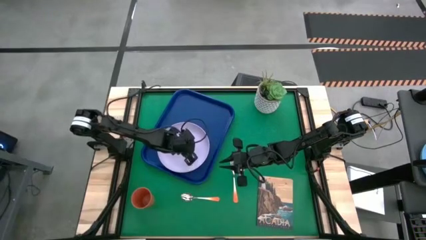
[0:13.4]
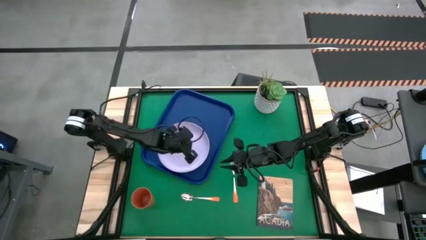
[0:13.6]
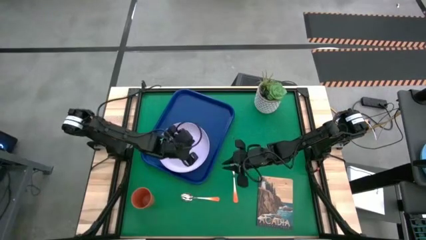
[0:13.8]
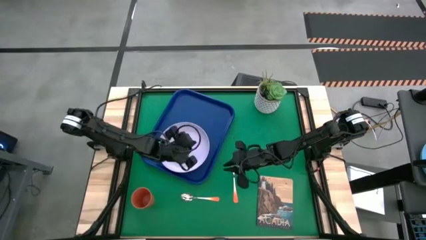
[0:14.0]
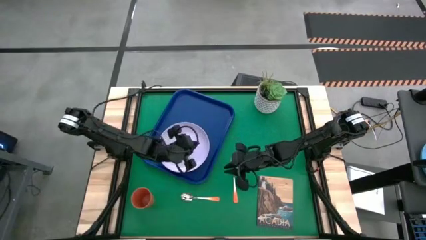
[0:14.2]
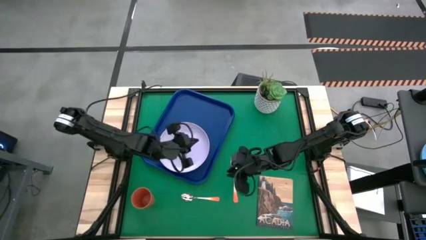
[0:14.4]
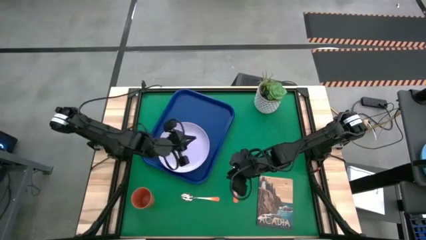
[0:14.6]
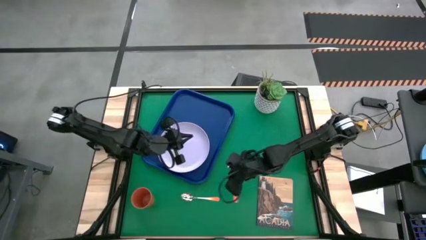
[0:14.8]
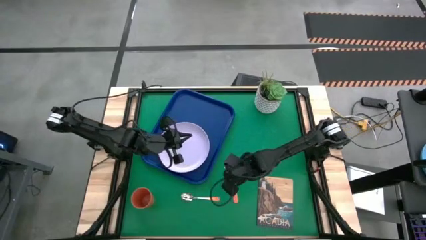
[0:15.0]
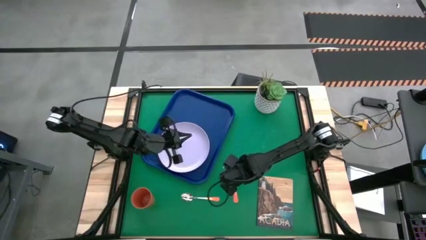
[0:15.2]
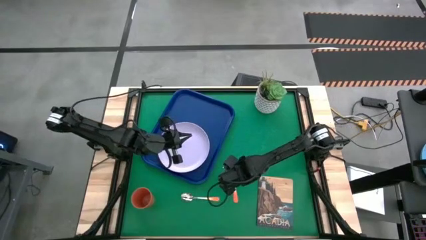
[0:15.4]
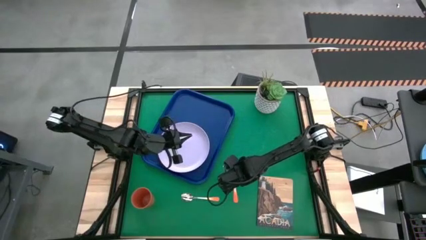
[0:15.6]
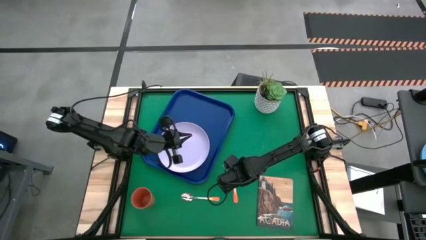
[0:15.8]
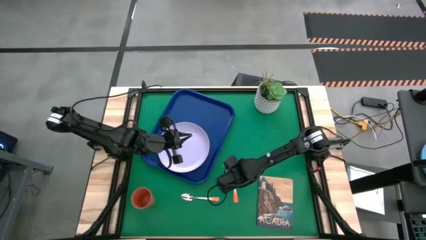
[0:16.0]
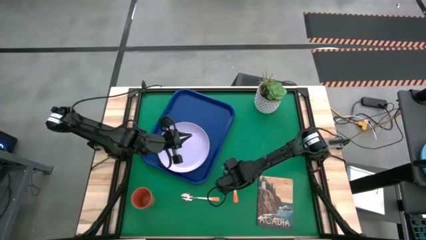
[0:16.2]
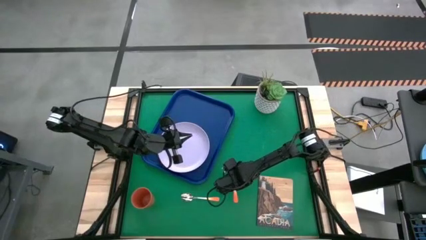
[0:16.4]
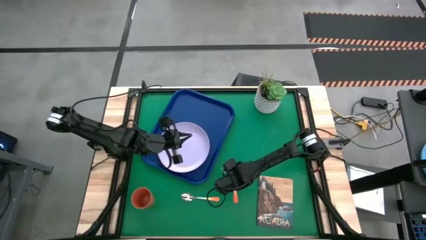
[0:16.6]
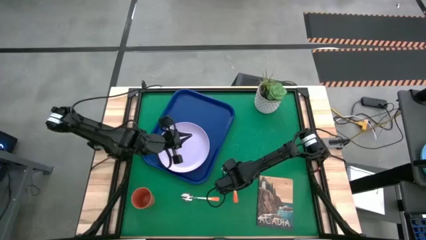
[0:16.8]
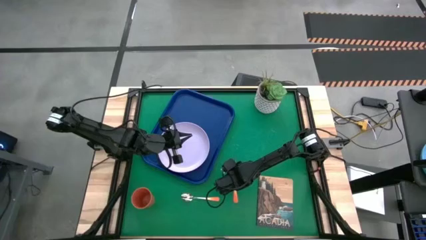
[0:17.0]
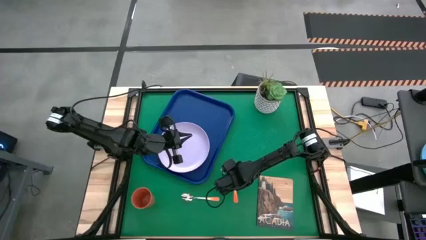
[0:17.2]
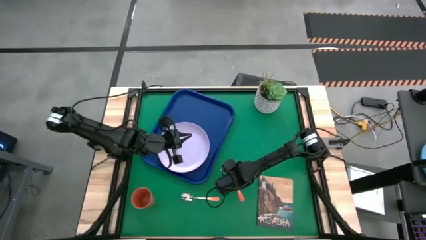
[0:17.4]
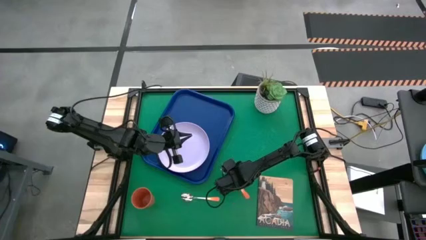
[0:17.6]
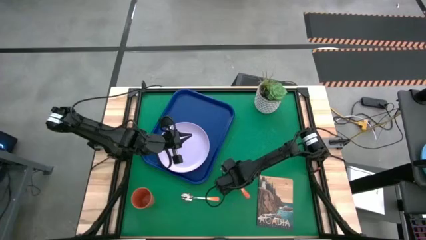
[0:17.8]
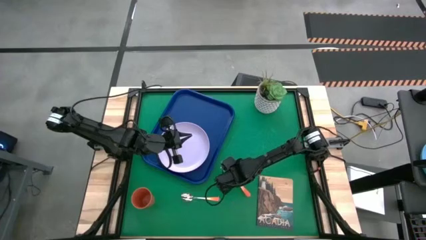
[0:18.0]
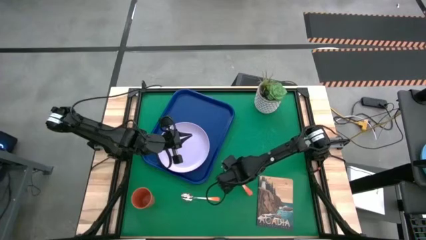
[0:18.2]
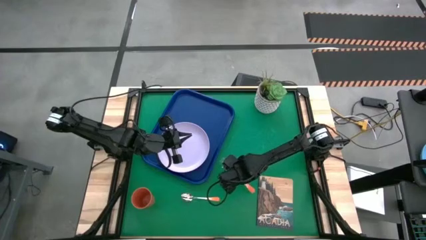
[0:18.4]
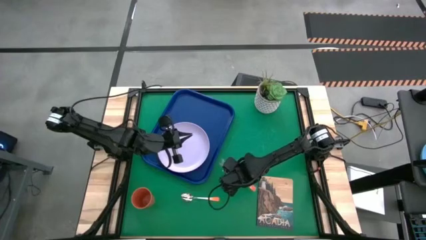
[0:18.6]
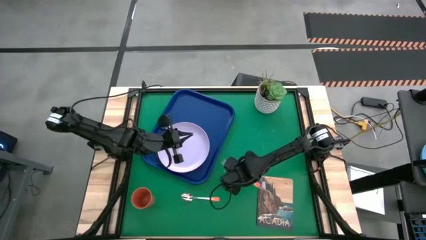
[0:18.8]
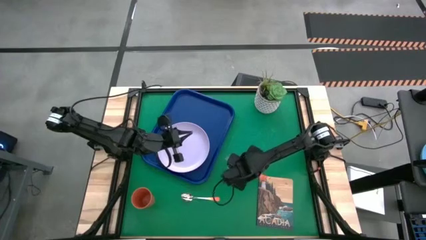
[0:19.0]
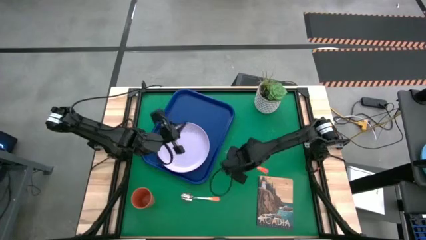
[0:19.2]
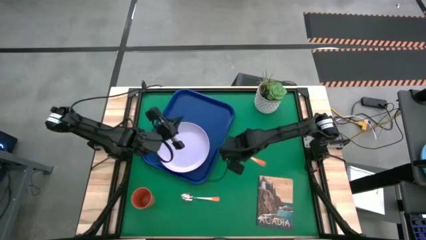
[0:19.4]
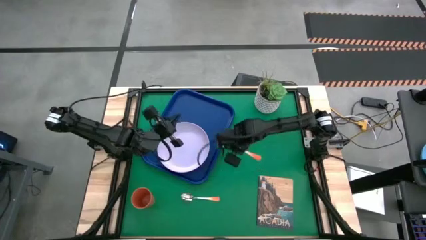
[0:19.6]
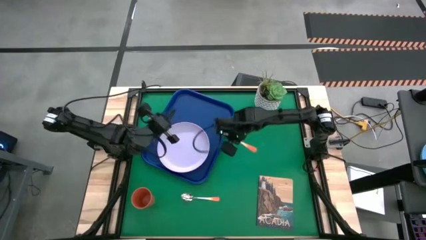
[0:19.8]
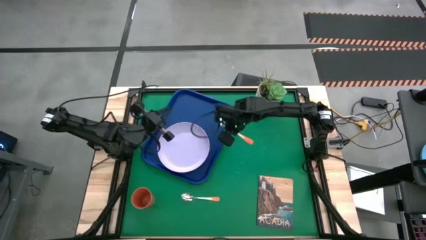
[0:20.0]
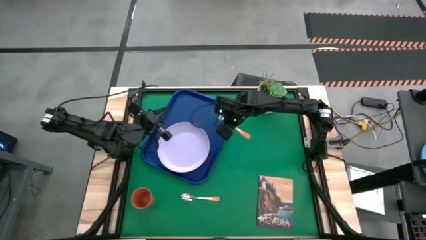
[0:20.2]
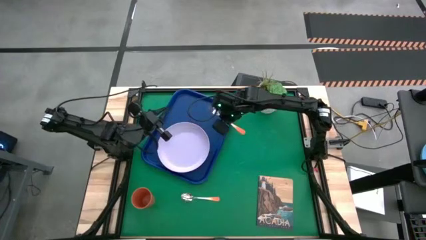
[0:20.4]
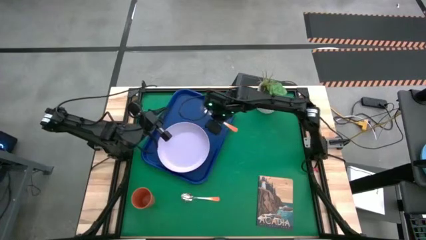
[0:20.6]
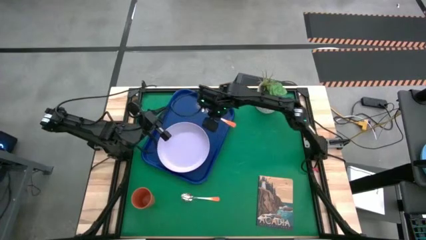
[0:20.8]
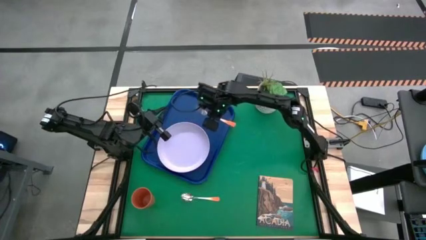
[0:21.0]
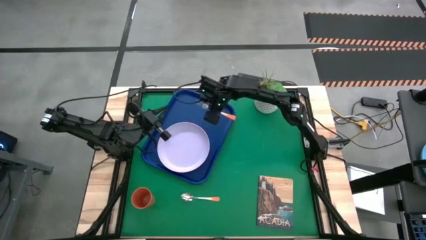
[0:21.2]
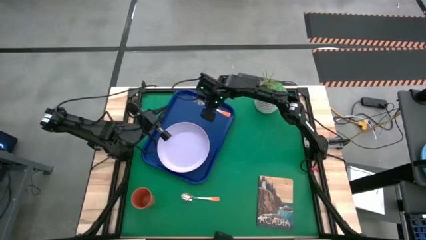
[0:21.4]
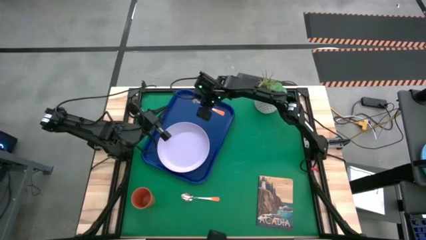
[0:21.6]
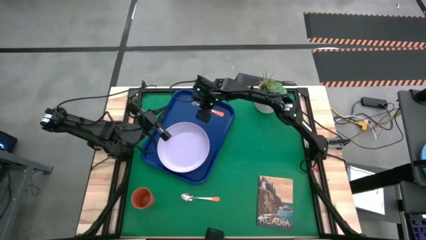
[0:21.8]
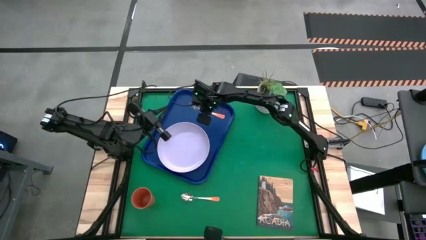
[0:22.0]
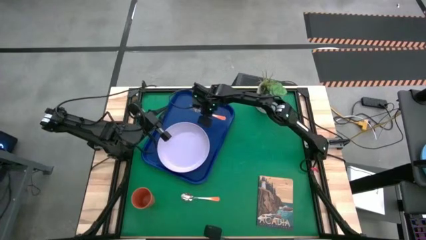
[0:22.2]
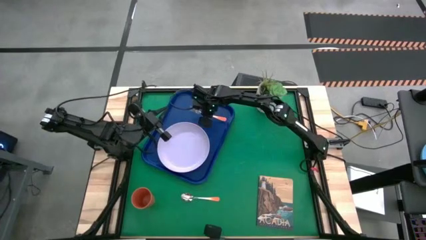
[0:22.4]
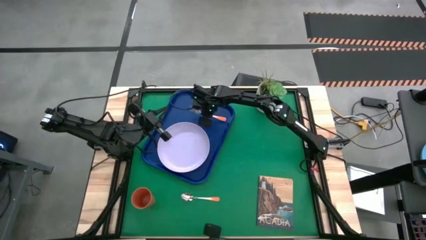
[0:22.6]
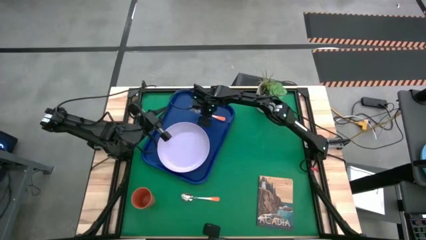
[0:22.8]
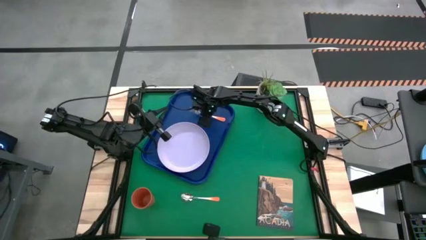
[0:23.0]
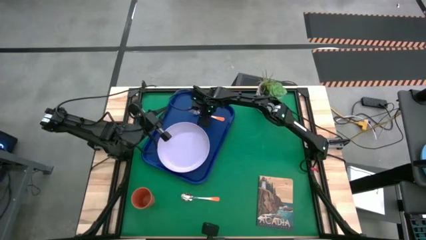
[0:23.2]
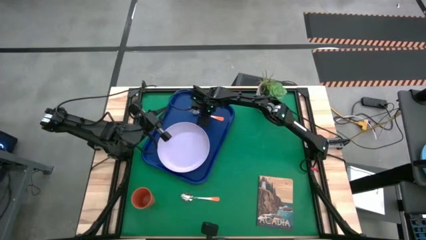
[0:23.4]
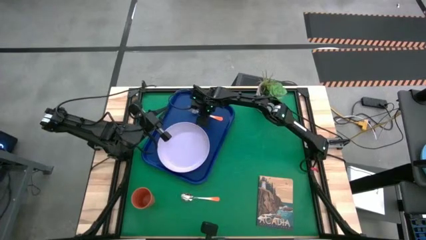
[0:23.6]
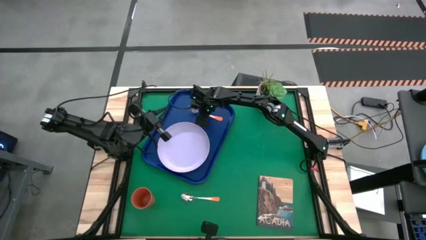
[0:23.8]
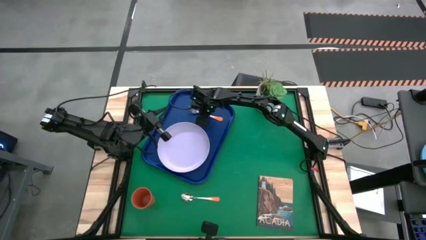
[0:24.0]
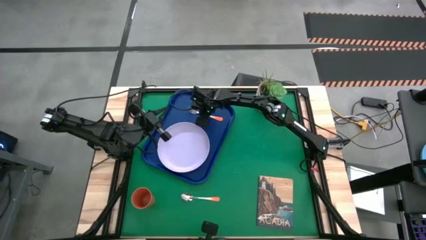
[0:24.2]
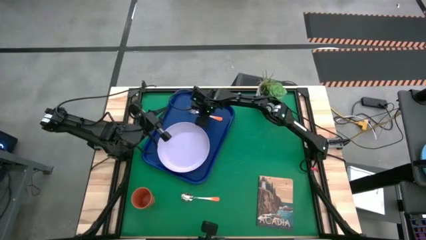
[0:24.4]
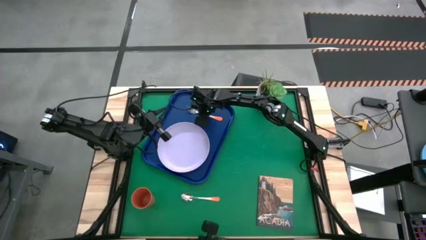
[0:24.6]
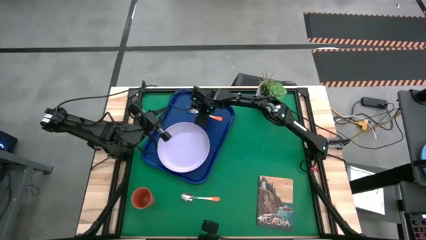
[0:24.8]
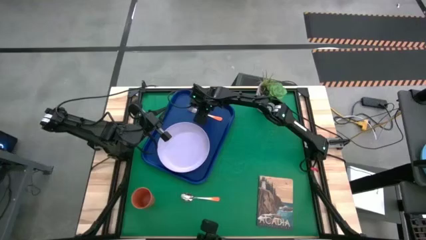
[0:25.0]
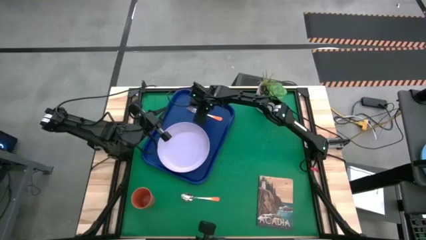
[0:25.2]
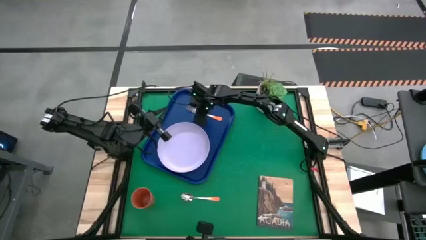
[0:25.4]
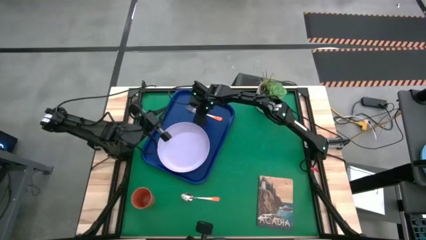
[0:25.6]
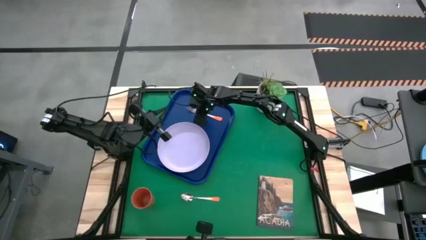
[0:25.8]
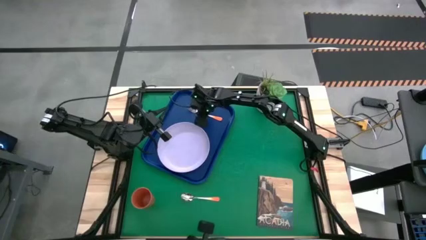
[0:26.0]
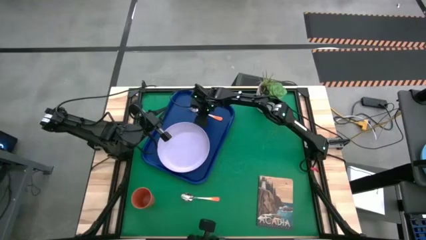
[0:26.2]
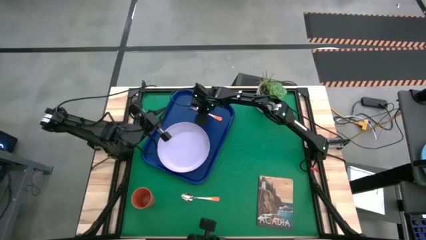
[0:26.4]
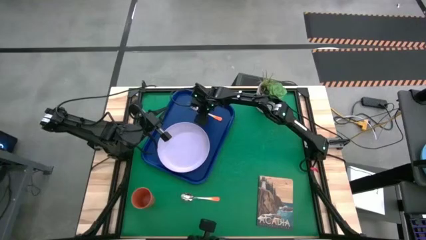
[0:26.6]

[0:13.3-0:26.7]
Task: Pick and place plate/cup/fork/spoon on tray
Put the orange fork on the blue tray on the right of the white plate

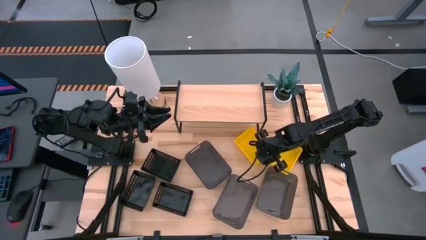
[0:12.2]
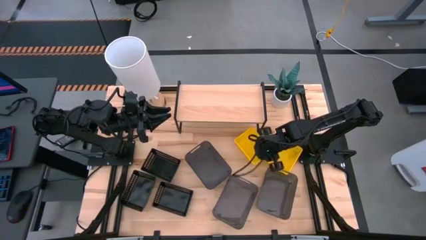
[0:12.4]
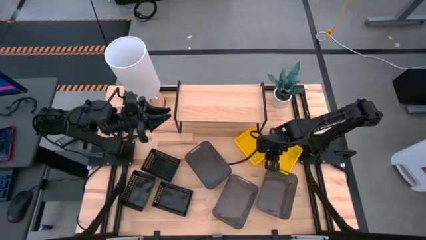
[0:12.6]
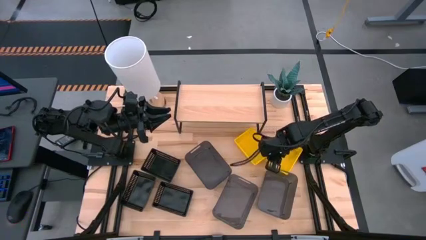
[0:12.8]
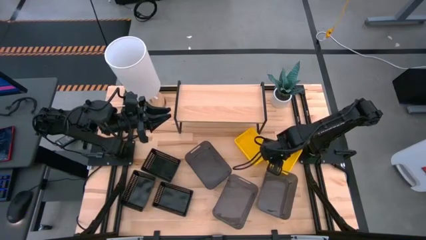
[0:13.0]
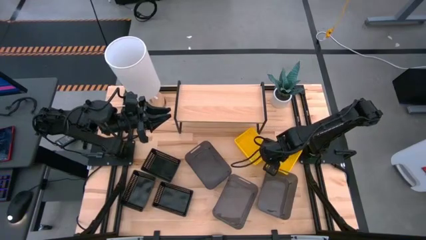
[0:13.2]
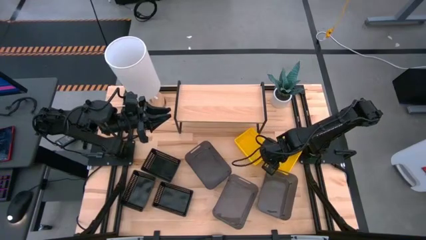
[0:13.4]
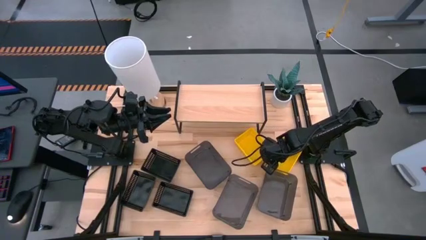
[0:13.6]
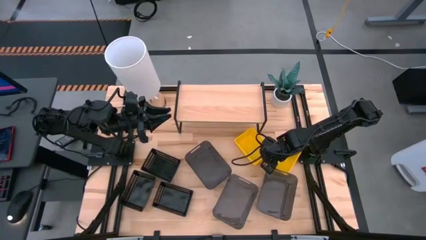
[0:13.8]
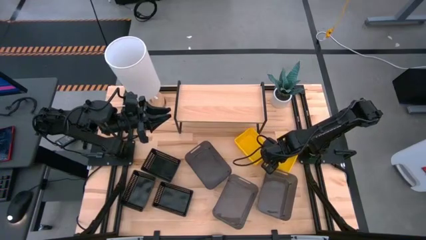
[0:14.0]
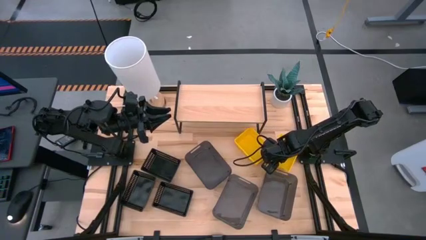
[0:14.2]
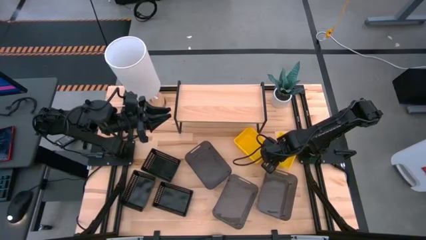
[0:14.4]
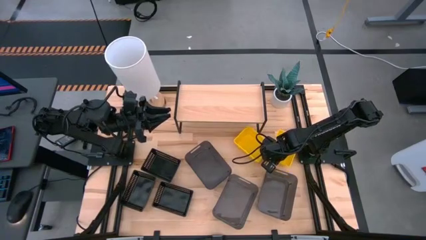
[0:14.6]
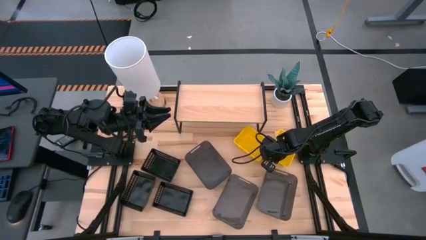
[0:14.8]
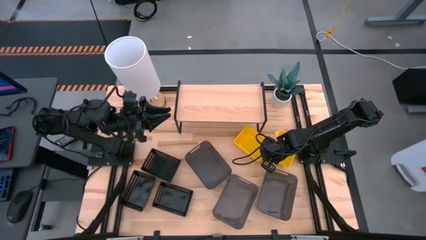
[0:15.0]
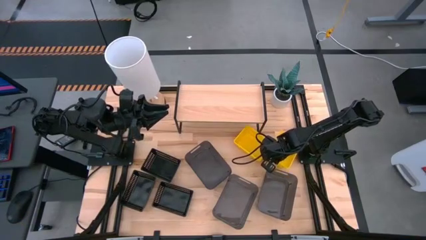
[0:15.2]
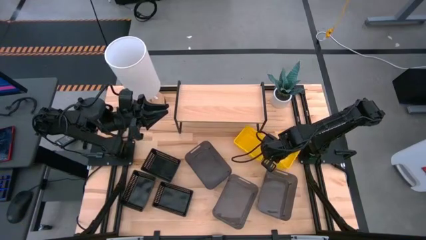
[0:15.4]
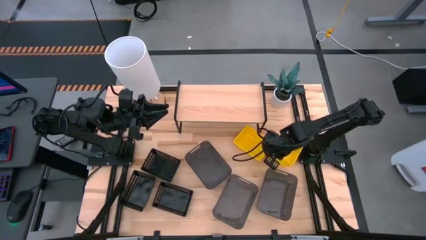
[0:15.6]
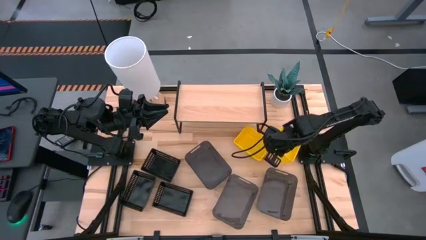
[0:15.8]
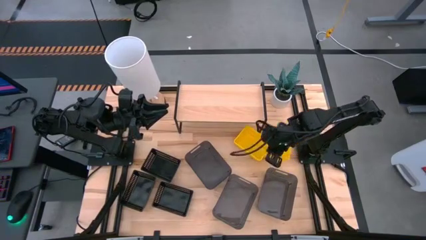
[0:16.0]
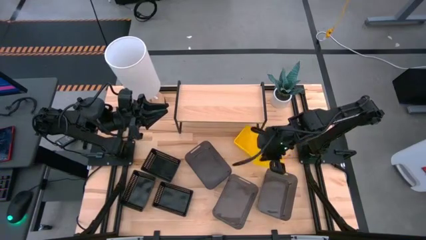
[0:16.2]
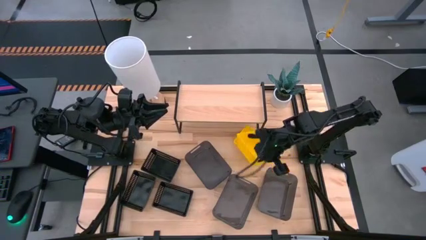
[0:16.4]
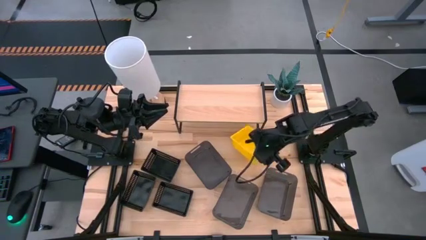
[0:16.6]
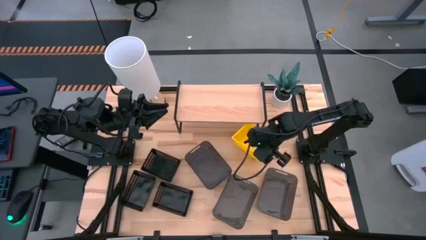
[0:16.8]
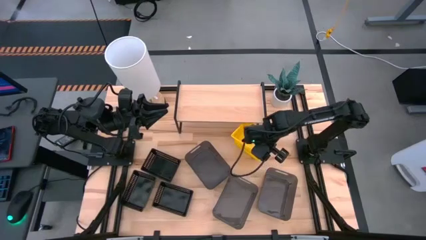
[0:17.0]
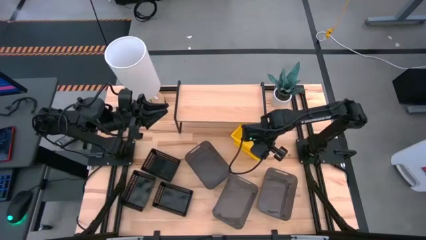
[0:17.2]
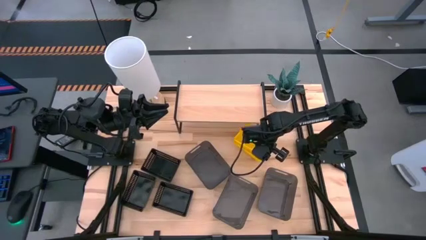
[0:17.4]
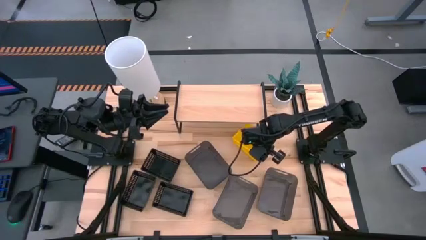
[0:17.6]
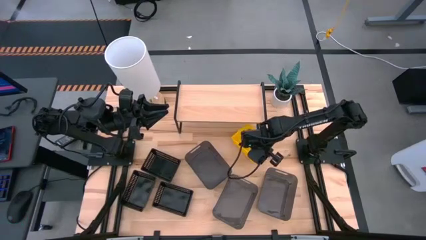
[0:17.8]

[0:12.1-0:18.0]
Task: Stack baskets on shelf by color
Stack the right yellow bin on top of the left yellow bin
